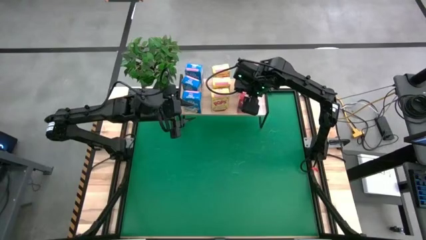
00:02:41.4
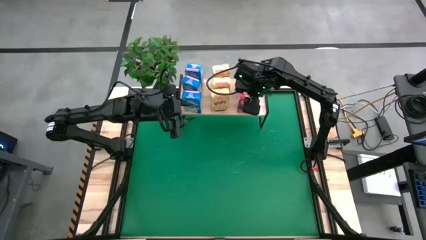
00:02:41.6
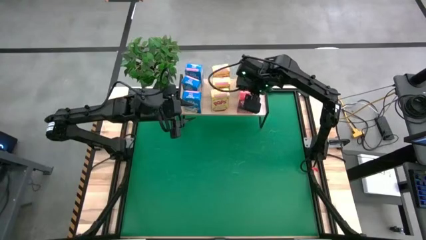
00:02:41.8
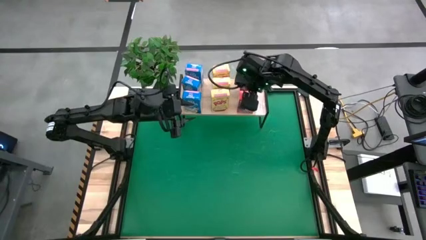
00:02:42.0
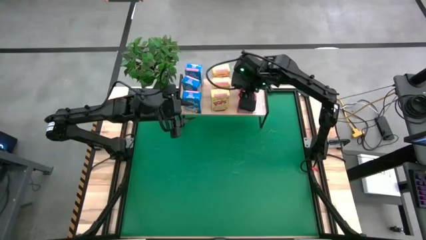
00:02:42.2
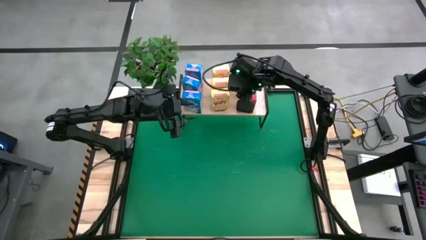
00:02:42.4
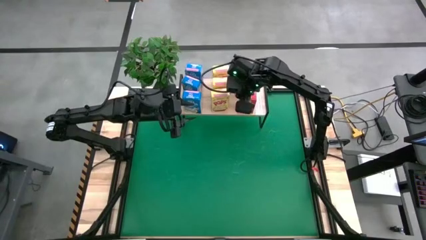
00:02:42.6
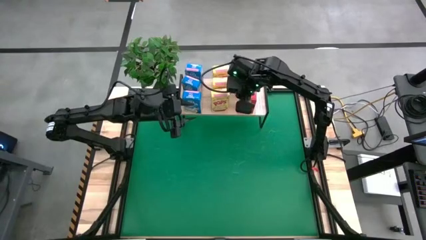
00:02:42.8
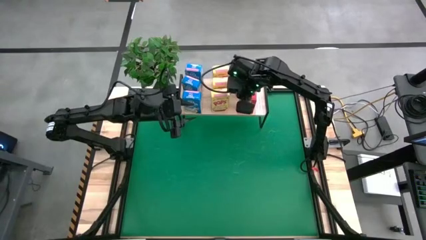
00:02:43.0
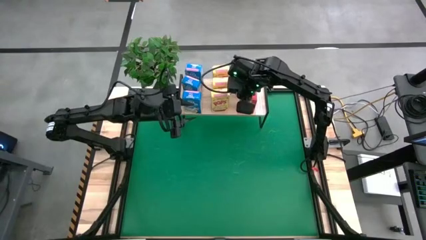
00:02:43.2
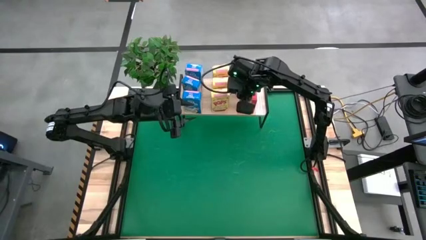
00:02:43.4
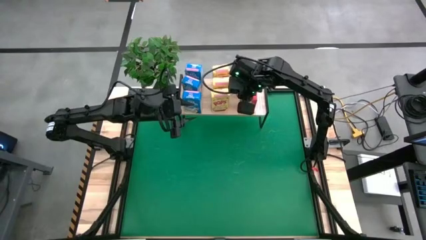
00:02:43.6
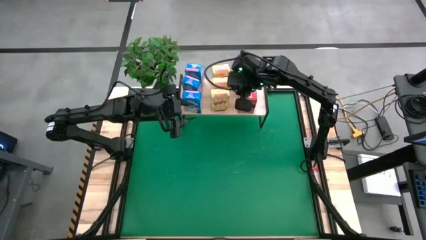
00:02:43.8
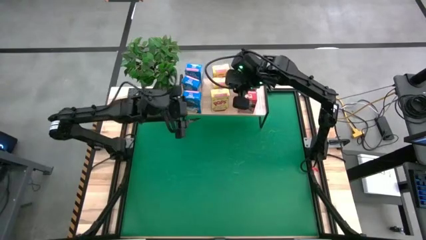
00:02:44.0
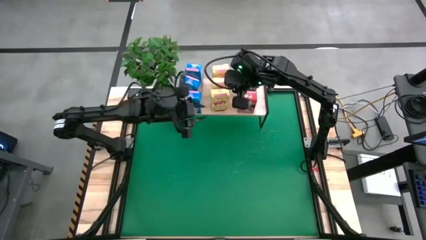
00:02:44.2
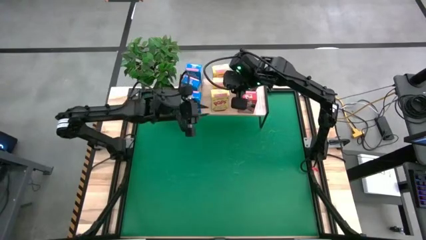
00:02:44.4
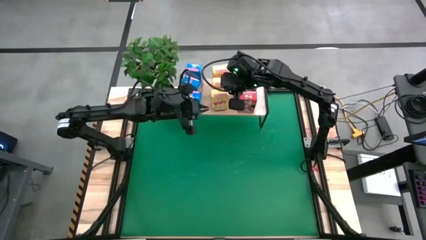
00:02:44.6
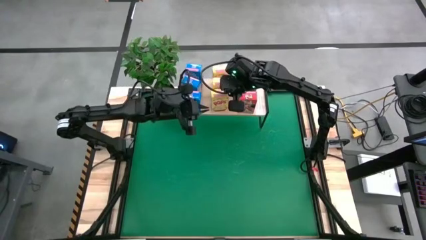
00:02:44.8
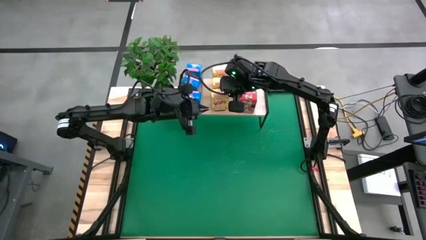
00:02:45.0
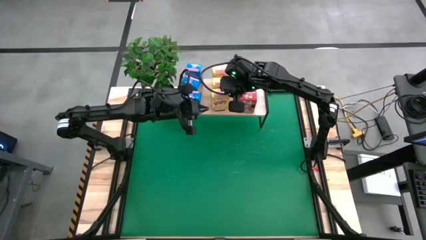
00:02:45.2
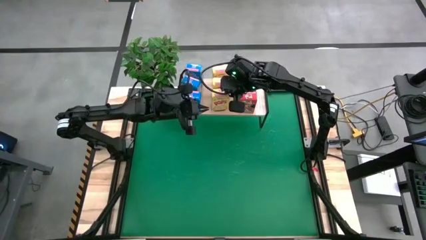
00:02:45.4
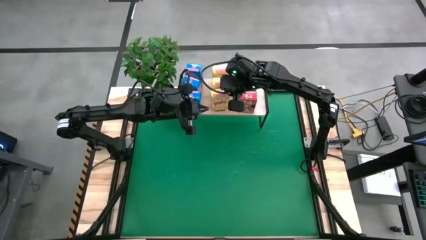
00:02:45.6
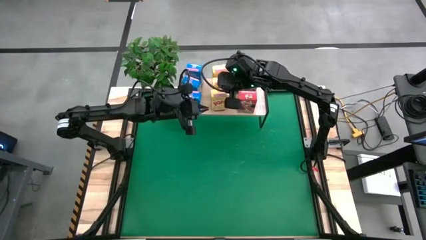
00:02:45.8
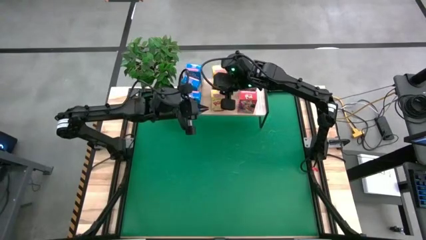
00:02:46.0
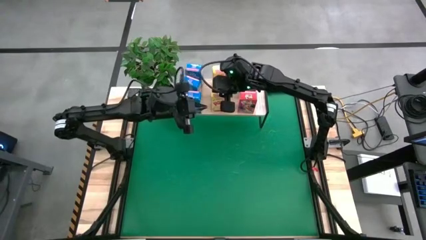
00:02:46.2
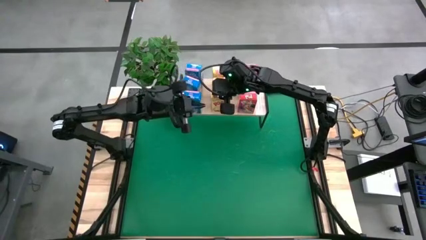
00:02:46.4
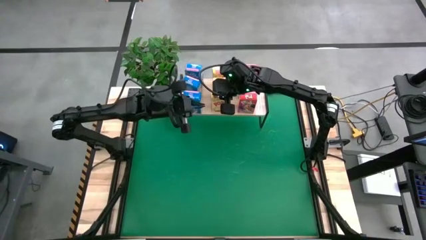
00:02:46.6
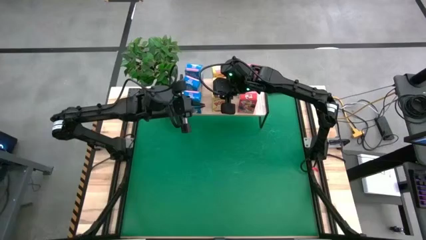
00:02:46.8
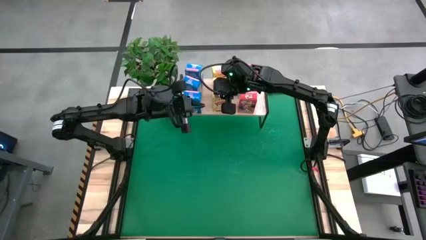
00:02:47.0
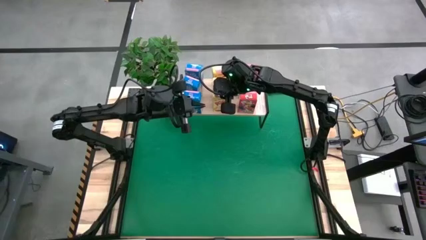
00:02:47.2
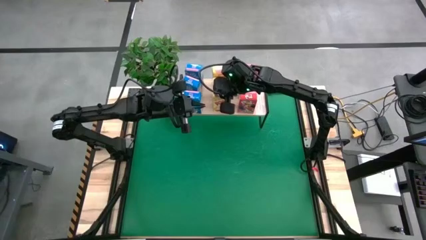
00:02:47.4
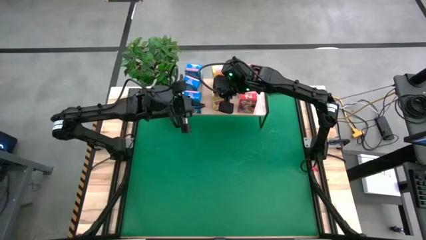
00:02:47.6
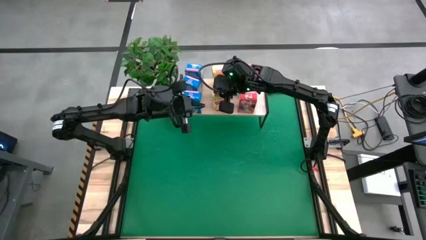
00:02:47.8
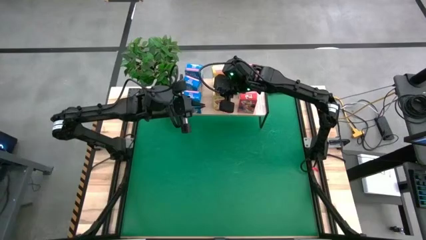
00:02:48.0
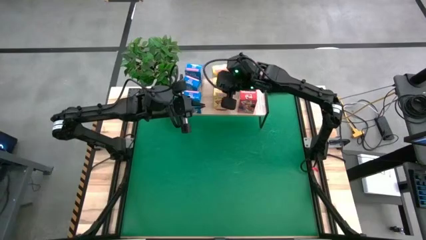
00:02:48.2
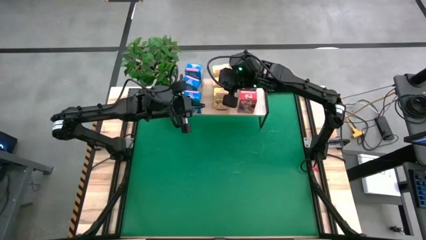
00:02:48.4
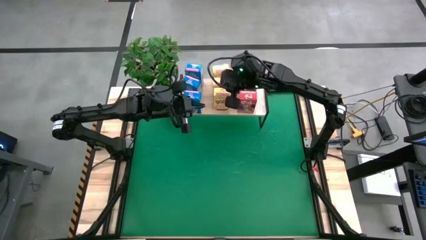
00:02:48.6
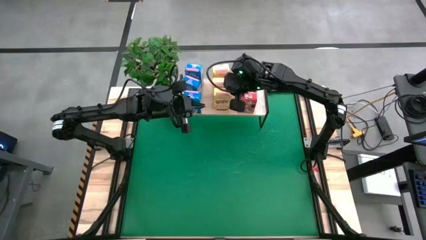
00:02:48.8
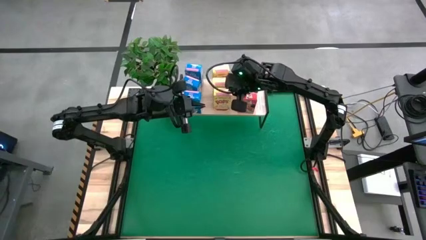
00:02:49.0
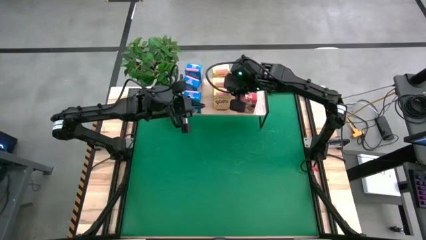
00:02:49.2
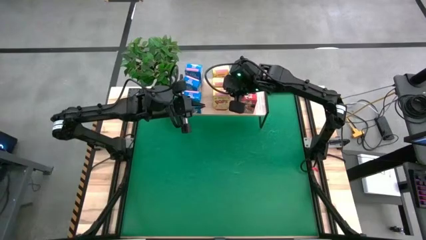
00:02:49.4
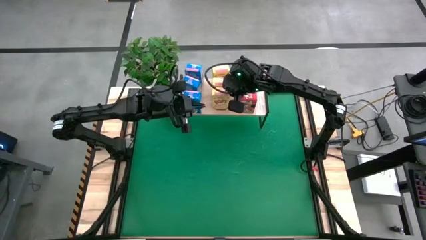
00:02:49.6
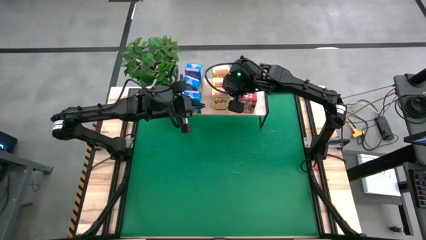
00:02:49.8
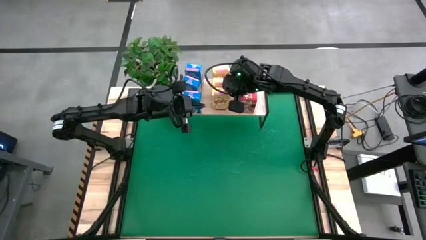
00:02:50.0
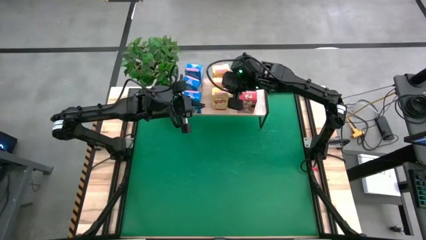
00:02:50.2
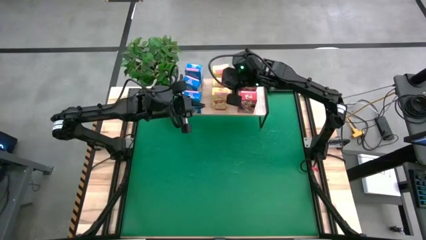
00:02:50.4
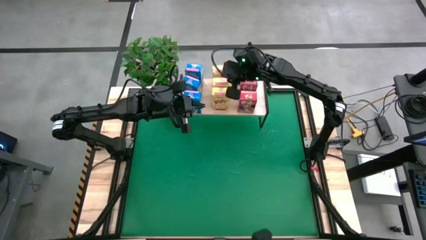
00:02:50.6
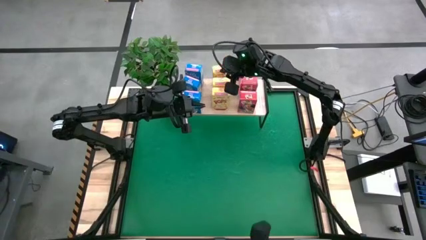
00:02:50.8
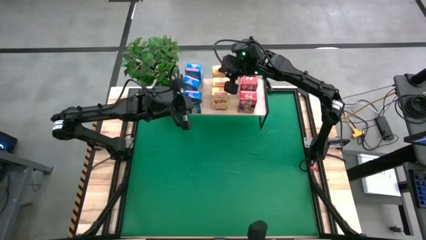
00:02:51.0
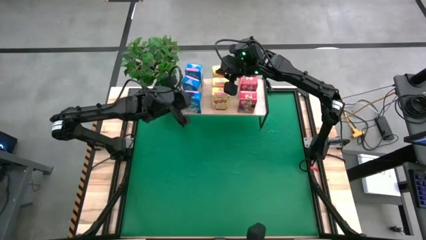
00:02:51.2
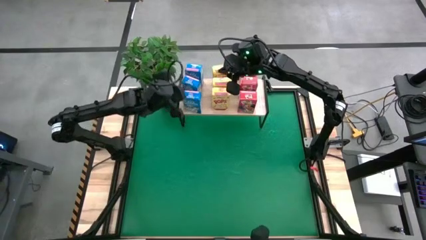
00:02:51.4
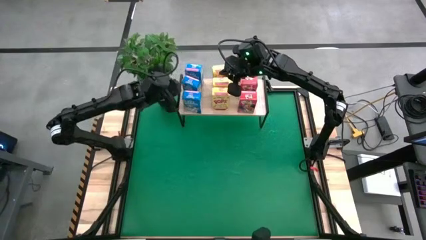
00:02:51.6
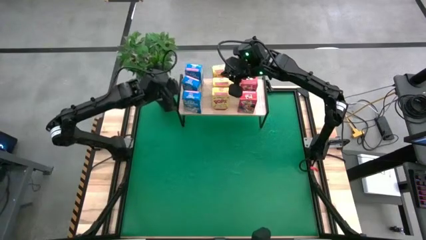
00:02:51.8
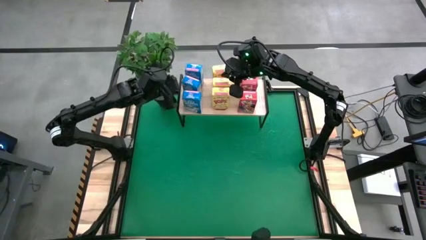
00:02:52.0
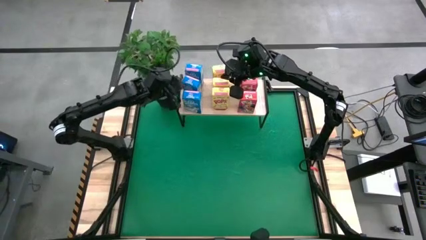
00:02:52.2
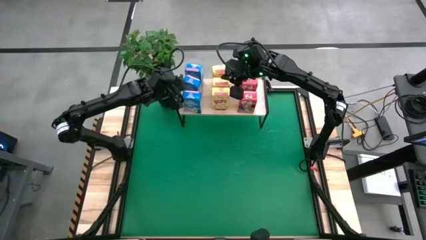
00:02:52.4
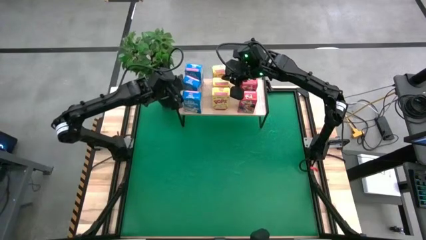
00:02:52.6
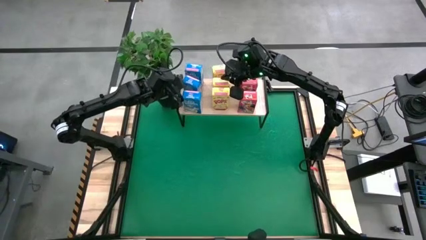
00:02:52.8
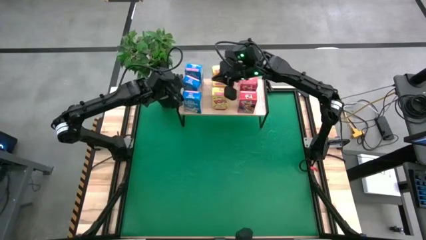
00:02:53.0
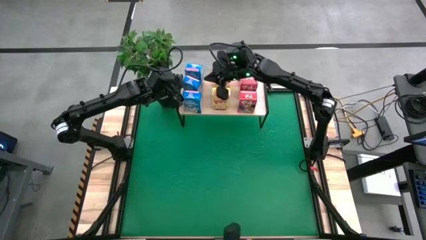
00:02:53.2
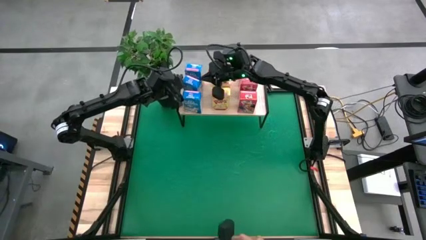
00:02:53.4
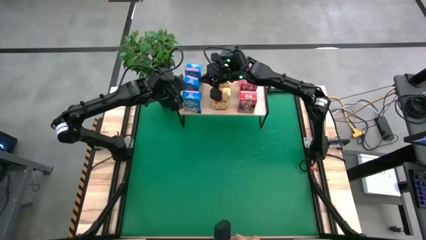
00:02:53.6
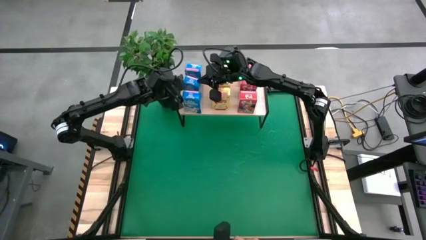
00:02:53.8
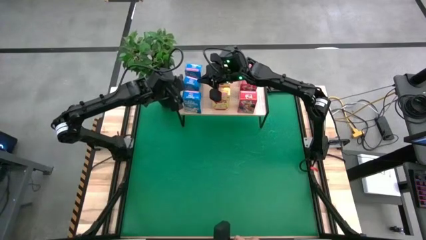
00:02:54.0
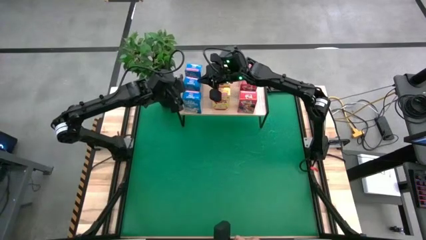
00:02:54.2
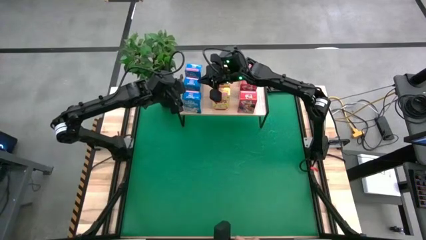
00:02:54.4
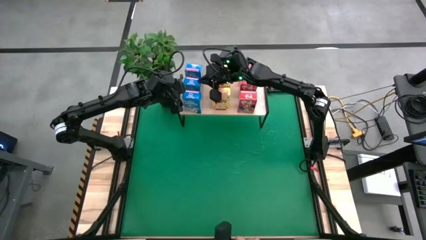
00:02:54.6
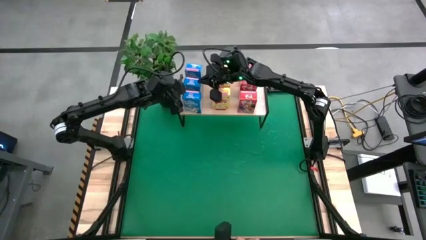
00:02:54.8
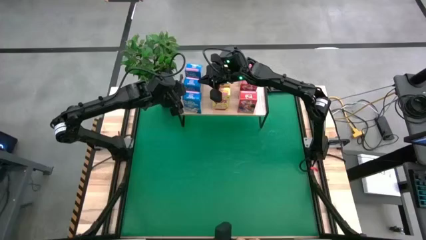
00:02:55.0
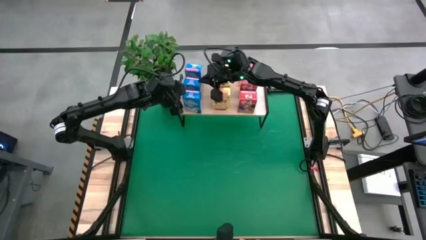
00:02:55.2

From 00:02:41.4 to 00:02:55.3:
Task: Stack cereal on shelf
Put the red cereal box on the shelf

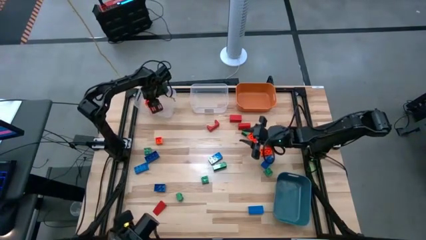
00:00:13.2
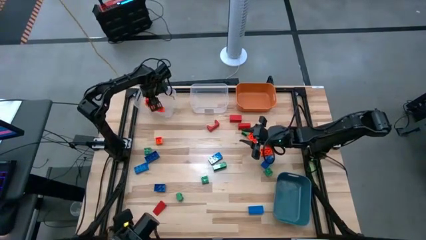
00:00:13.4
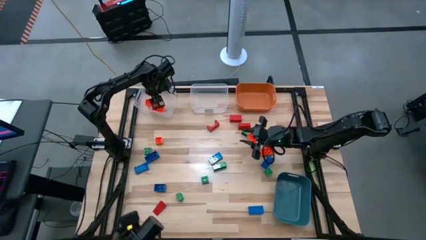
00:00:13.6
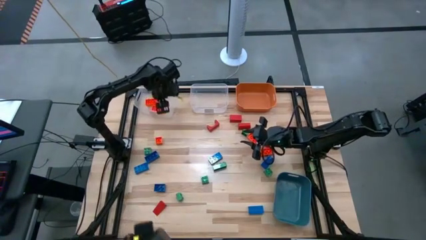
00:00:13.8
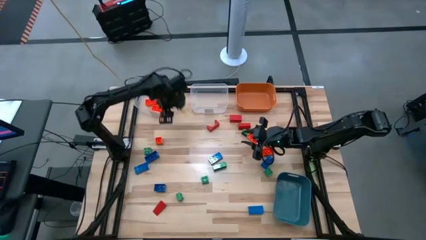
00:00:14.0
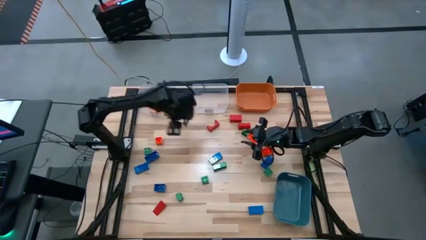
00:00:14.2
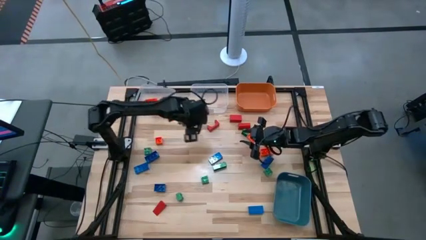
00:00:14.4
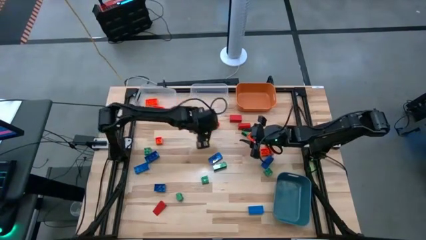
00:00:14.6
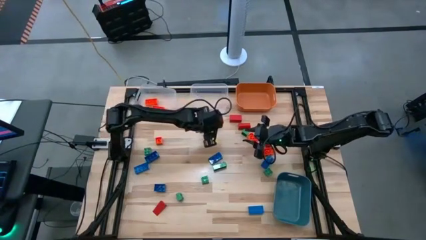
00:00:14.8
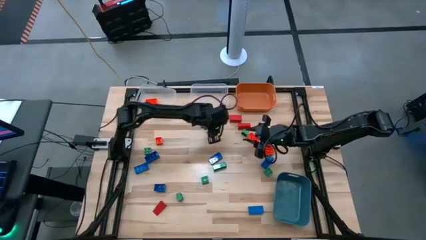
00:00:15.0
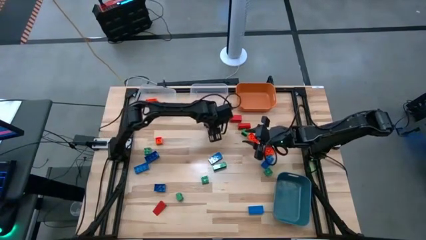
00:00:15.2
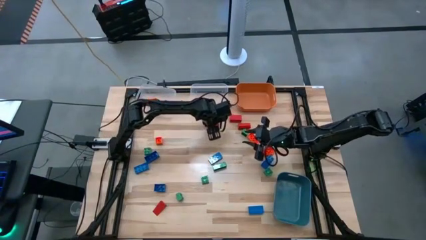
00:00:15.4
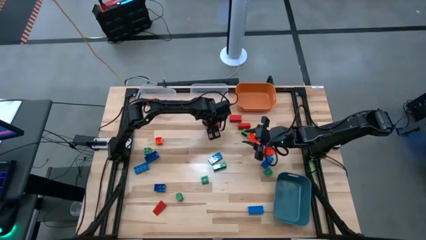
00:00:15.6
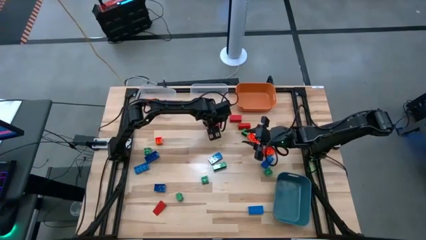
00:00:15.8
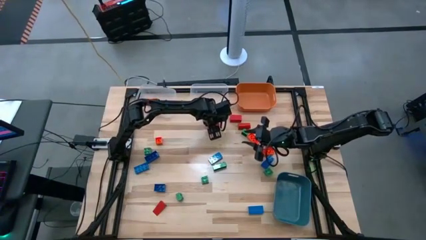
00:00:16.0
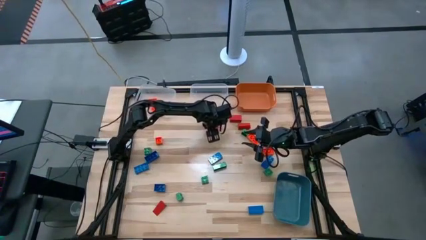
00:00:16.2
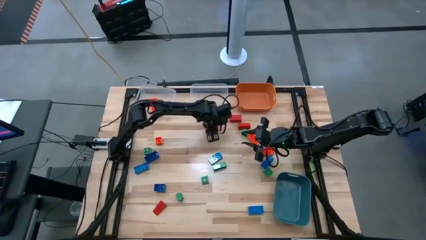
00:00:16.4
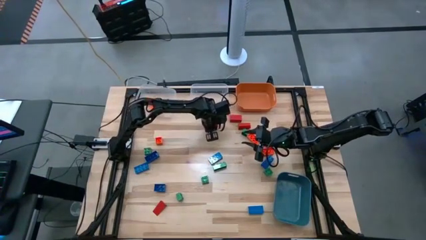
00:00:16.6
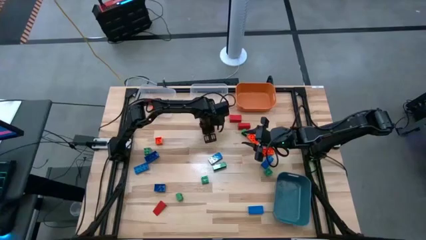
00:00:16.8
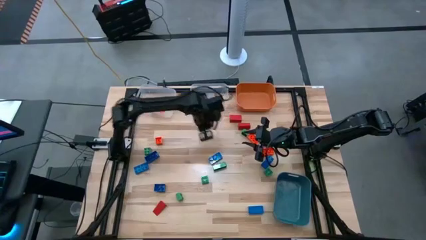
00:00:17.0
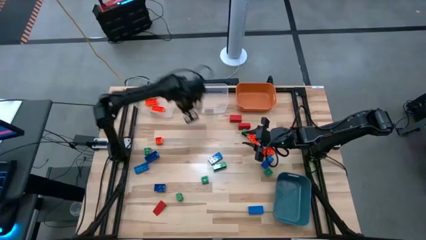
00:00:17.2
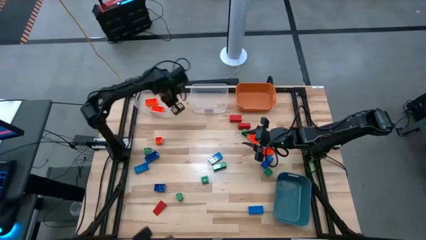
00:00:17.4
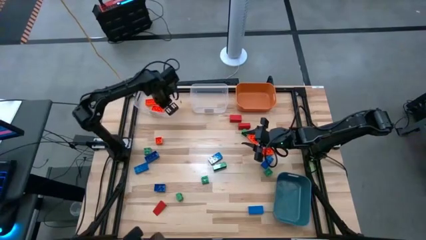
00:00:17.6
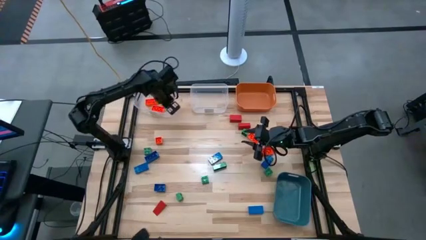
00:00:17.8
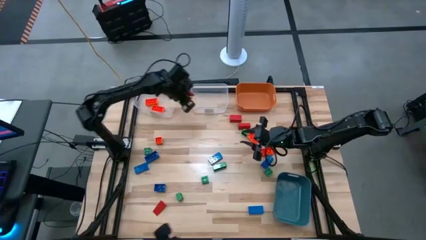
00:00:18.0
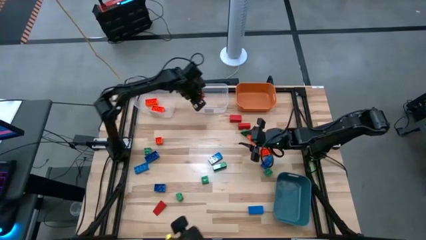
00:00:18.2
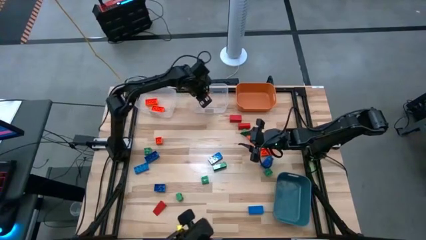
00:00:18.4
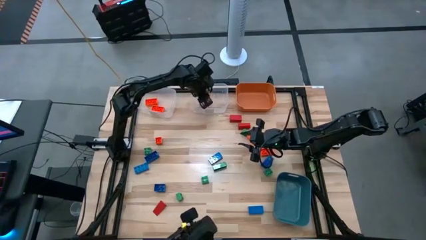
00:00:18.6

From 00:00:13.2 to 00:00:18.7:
Task: Sort blocks
Put the red block into the right transparent bin
